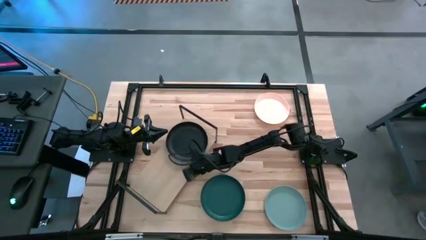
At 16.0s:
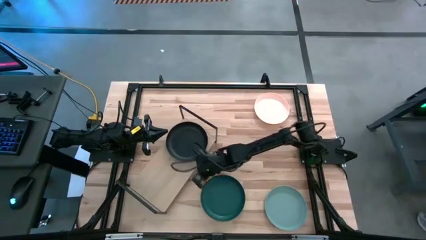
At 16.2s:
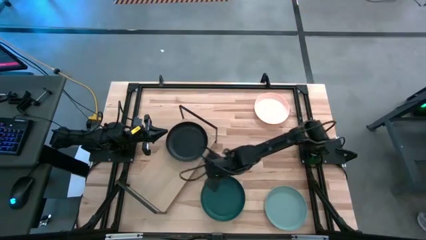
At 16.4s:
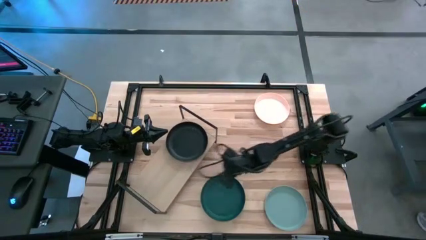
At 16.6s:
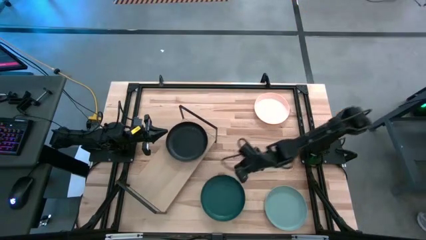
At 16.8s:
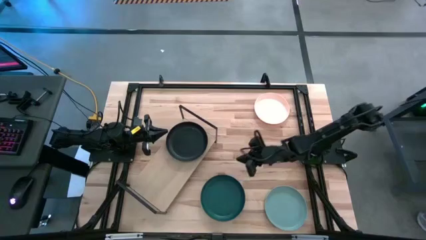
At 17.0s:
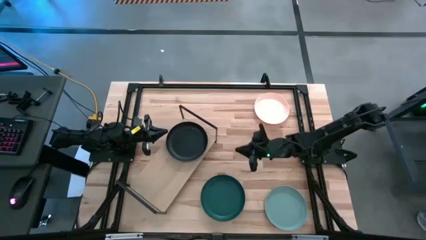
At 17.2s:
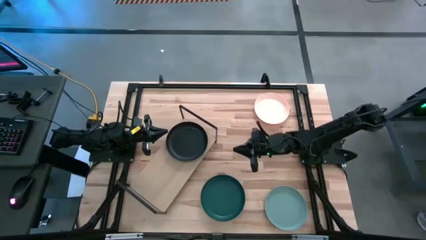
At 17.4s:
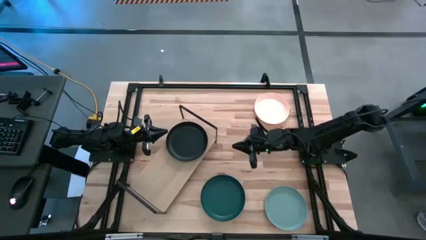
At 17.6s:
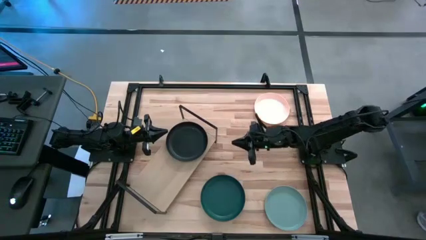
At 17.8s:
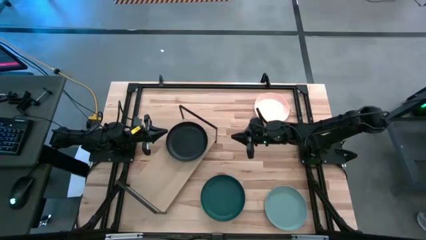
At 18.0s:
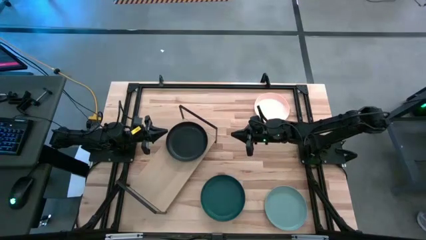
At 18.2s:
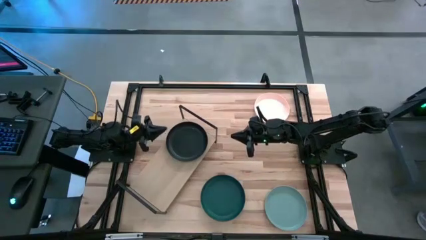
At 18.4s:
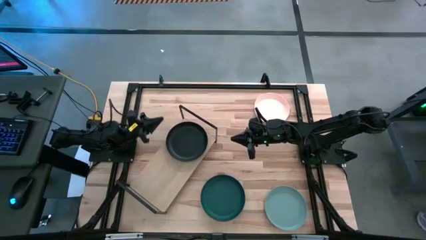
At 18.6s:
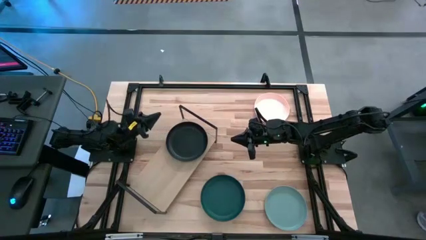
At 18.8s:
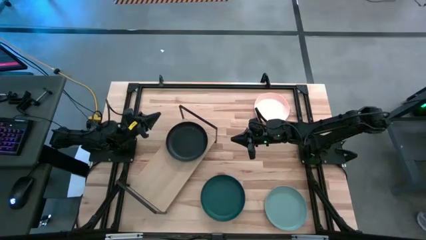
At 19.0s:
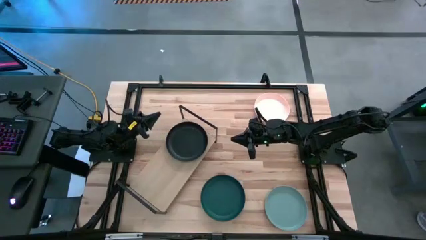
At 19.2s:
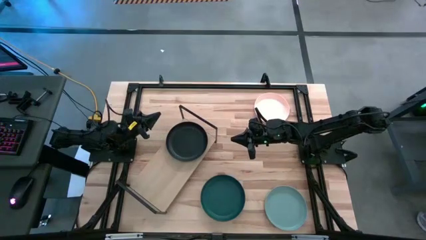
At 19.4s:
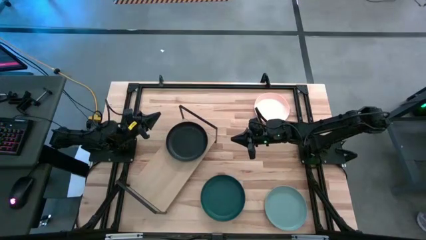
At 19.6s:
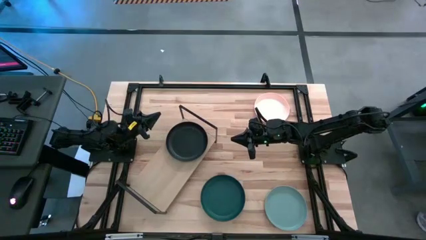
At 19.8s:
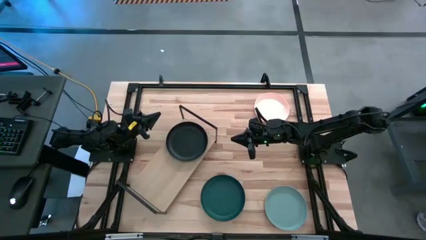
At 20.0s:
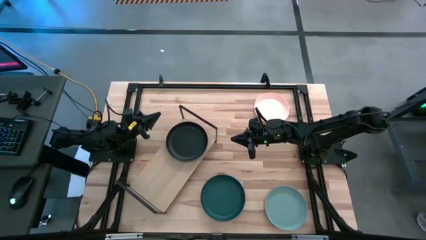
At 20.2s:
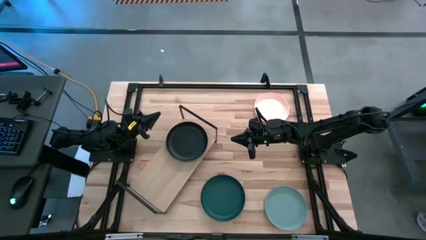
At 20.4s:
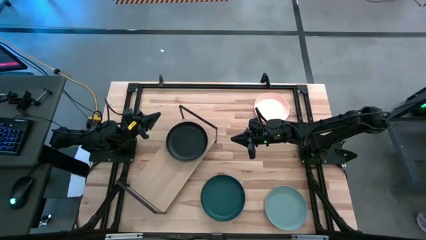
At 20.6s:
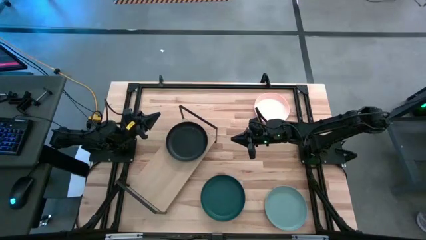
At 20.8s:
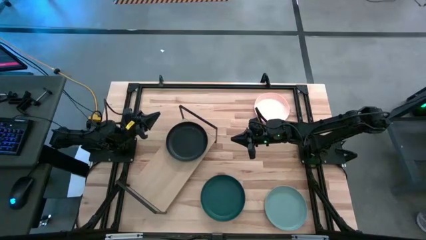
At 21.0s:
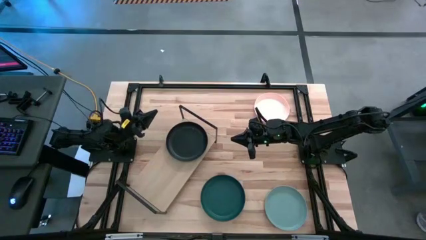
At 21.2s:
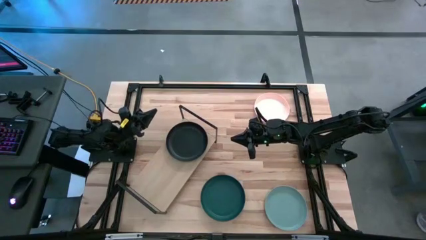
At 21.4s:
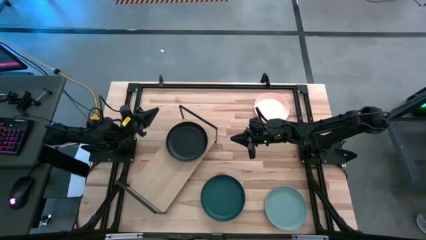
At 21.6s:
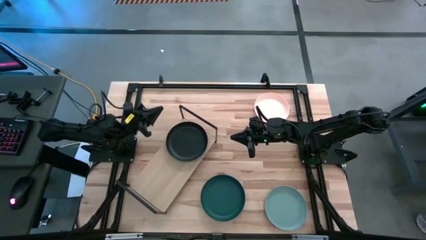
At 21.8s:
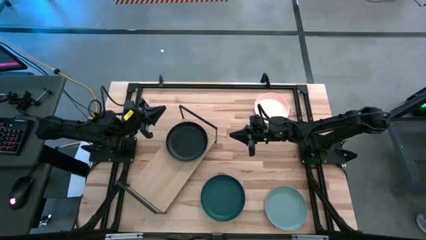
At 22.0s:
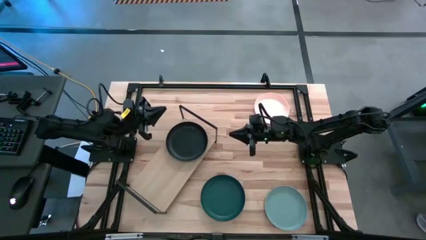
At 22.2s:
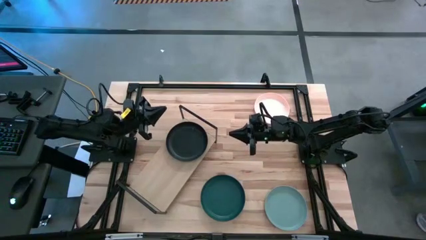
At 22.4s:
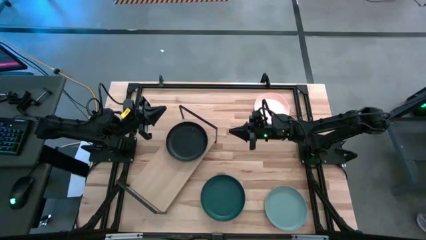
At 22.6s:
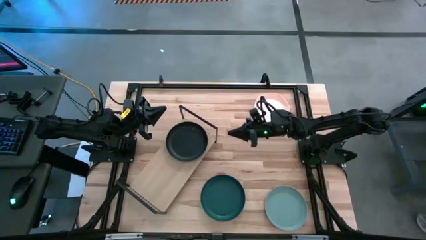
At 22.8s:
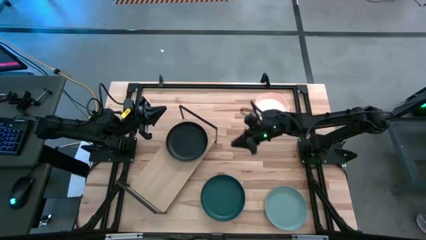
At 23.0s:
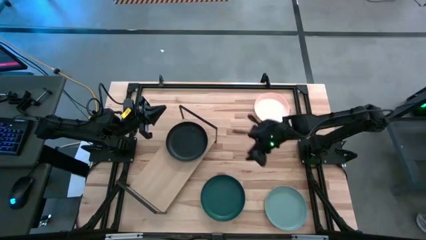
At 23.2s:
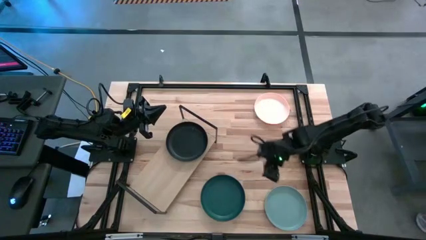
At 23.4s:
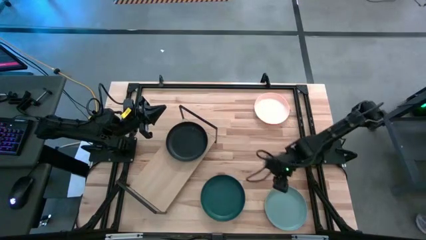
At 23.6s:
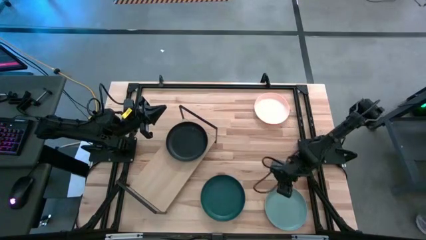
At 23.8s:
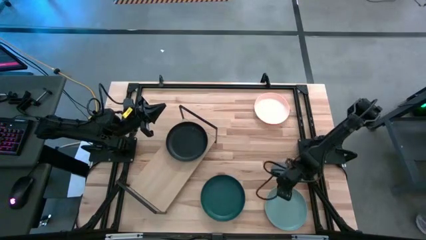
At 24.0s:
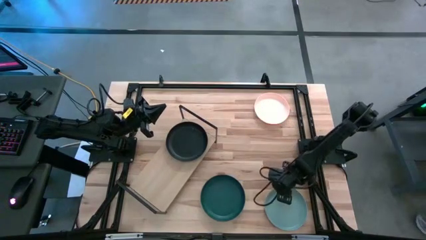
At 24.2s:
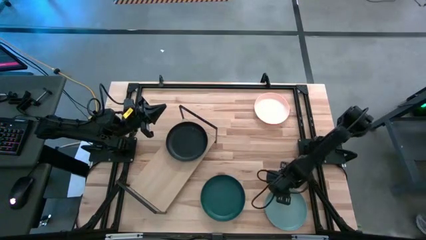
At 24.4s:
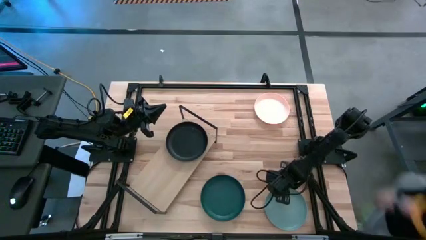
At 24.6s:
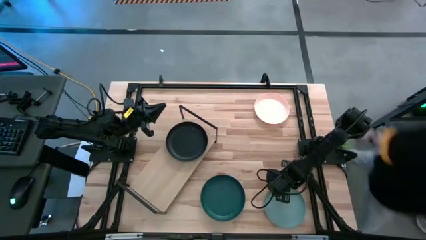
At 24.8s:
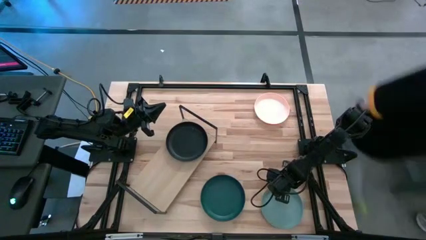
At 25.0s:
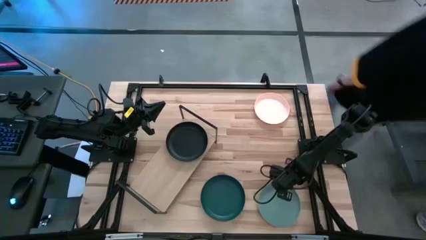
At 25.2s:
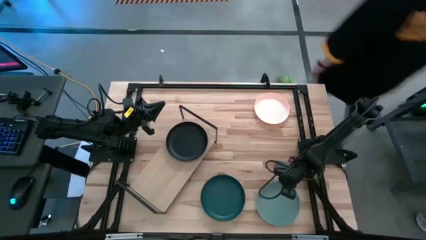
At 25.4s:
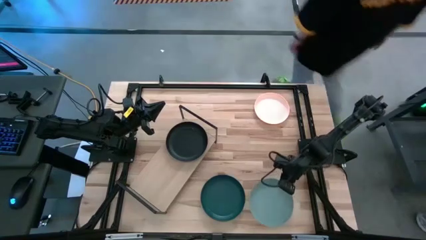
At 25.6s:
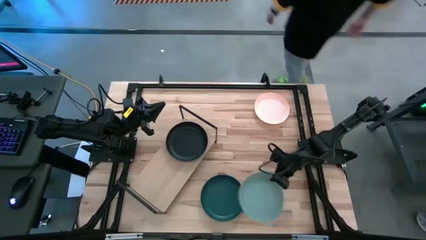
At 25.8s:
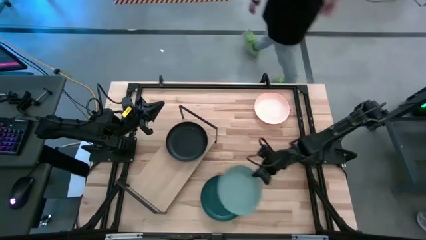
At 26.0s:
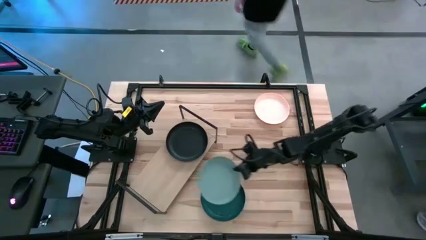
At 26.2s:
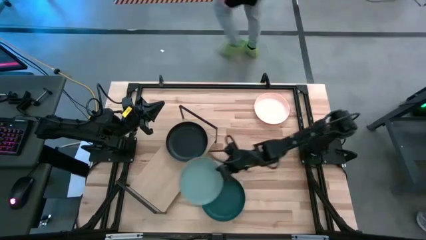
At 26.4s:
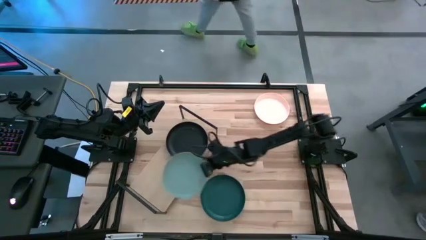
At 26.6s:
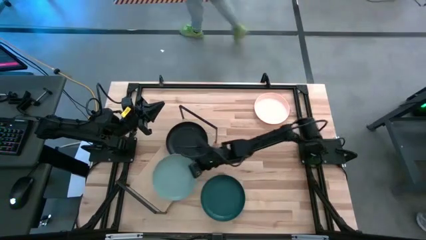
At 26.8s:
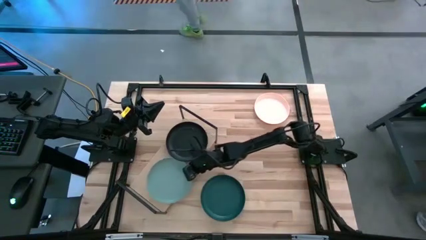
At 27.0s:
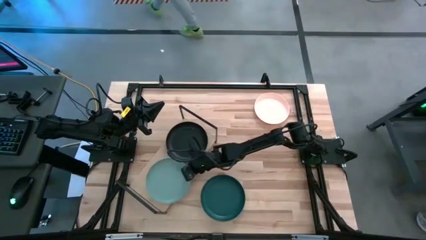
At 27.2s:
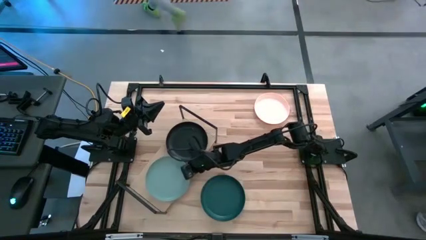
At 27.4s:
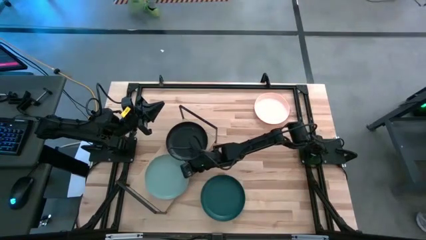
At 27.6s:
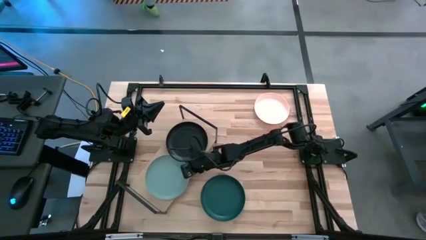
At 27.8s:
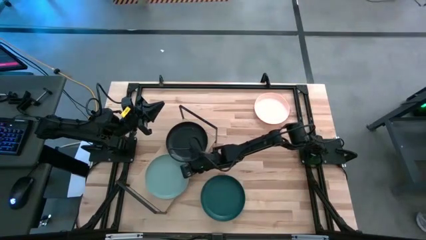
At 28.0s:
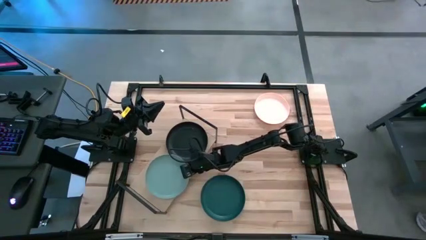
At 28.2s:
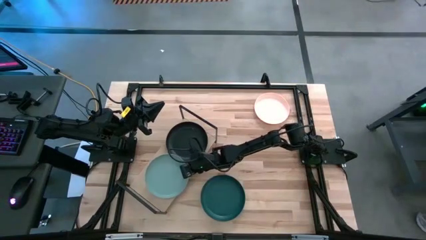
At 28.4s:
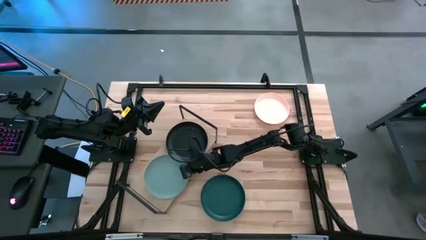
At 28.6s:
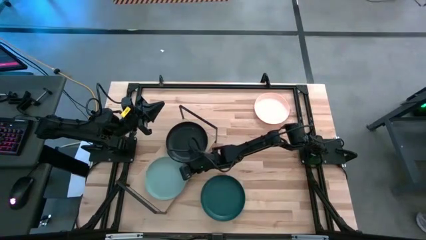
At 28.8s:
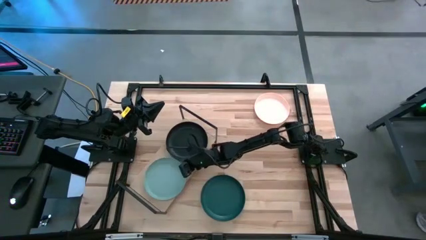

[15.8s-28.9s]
Task: Place and stack plates onto a shelf
Put the light blue plate on the shelf

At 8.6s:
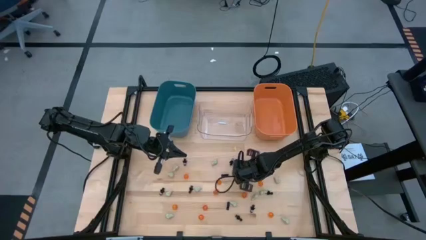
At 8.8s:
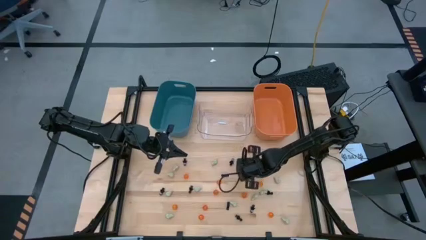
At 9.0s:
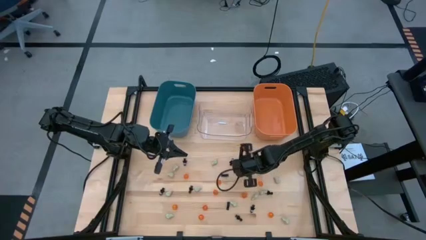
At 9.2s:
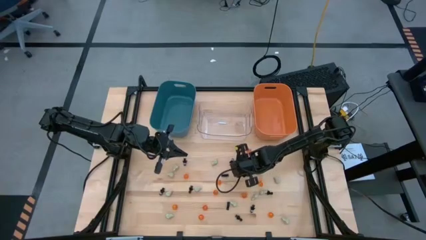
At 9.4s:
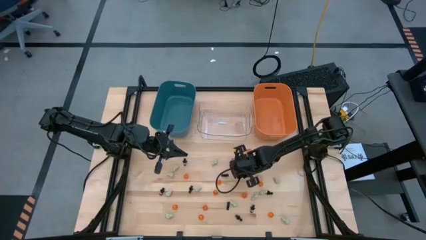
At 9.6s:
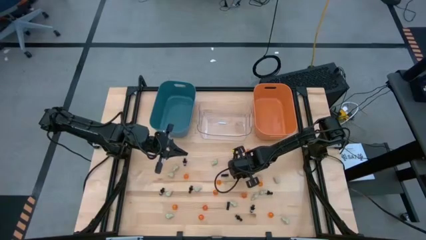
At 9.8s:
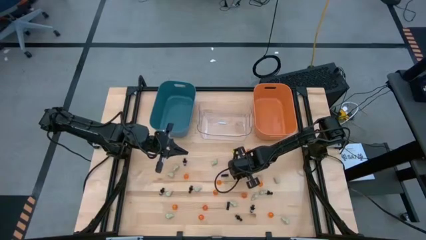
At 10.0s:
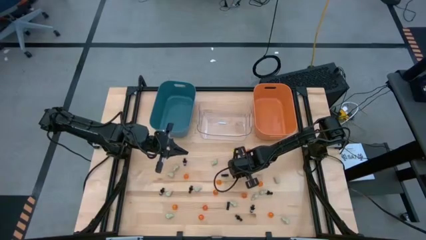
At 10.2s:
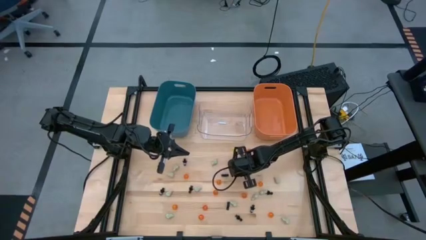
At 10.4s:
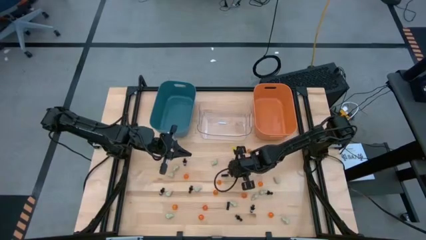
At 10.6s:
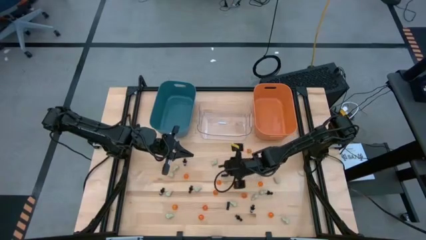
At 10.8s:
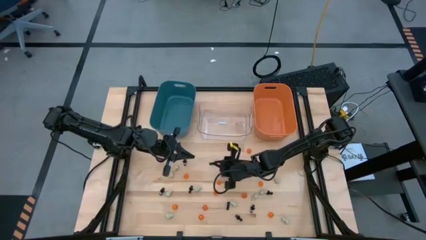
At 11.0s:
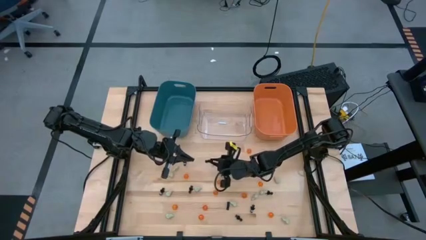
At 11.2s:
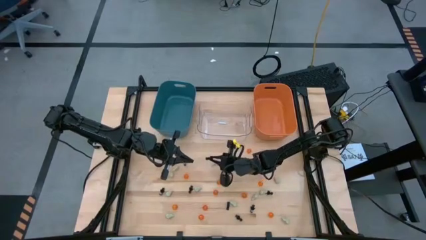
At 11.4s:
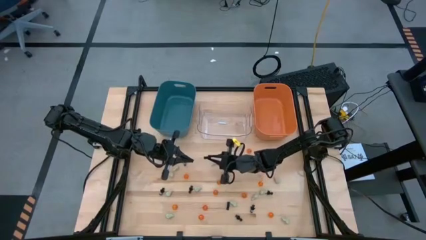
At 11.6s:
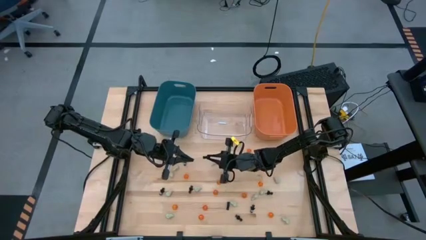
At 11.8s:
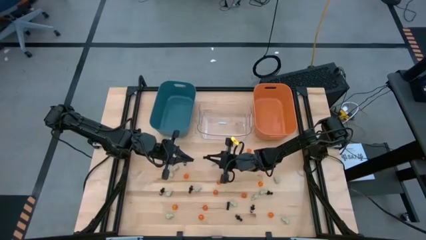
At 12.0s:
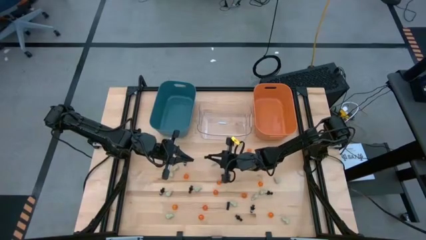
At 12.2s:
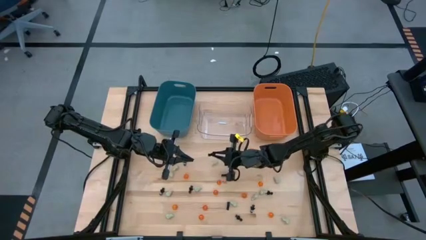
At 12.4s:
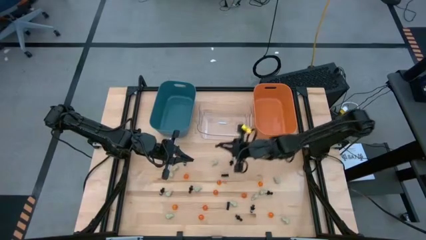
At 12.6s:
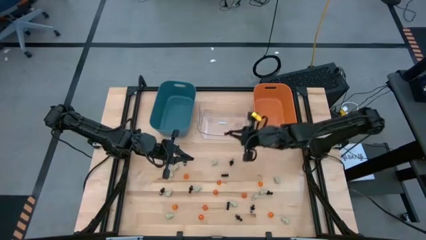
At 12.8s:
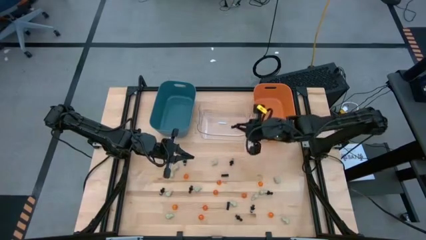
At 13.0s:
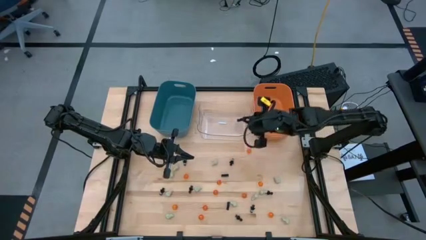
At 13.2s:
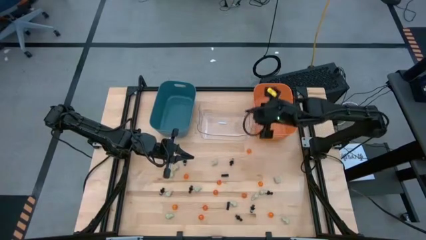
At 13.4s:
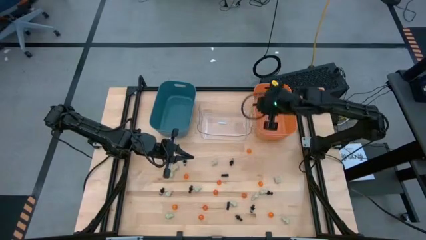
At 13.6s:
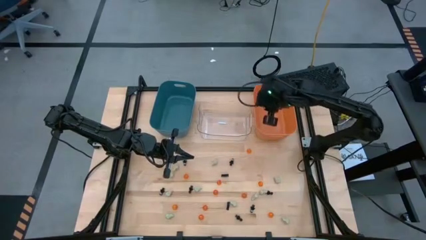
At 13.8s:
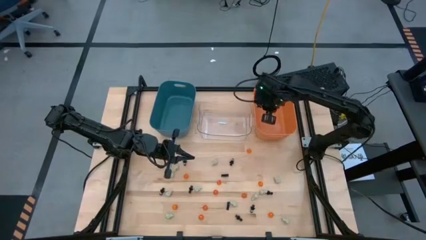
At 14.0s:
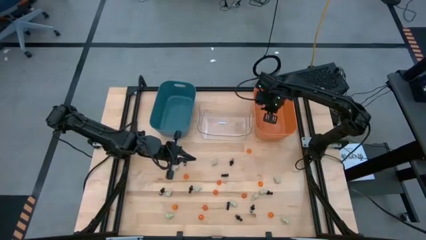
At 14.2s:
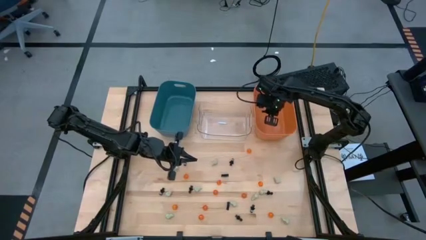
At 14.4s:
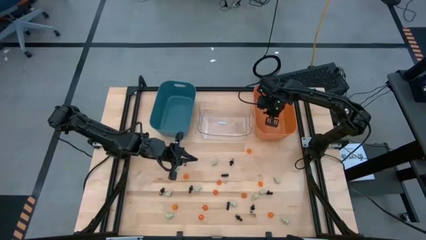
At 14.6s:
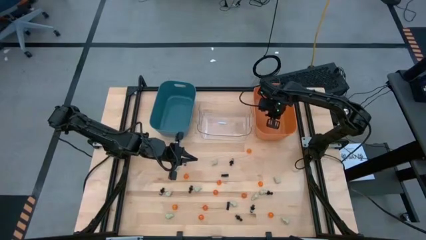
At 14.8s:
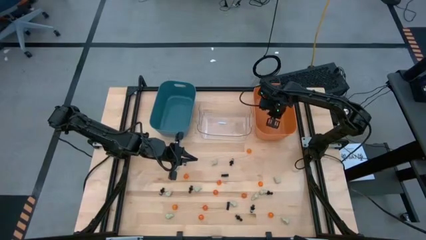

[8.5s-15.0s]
Task: Sort Halloween decoration
Put the black skeleton toy into the orange bin
